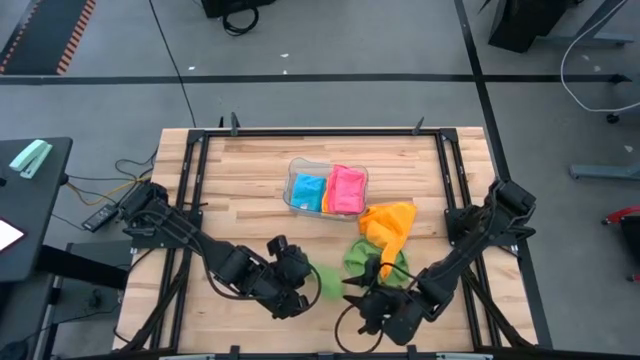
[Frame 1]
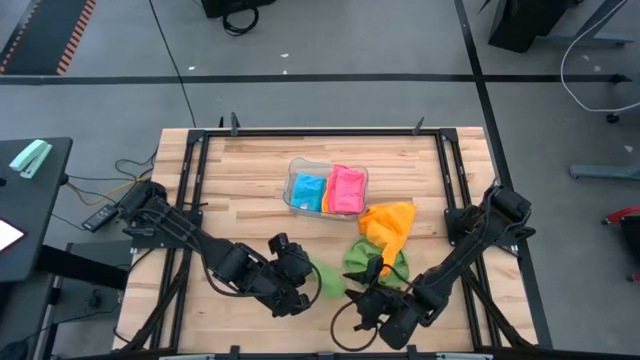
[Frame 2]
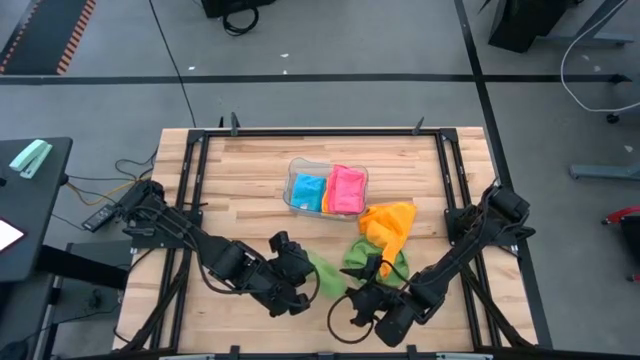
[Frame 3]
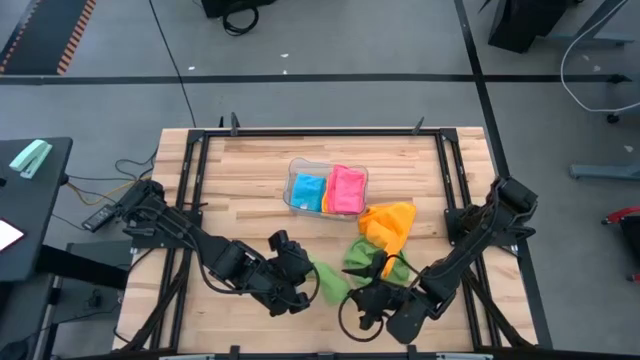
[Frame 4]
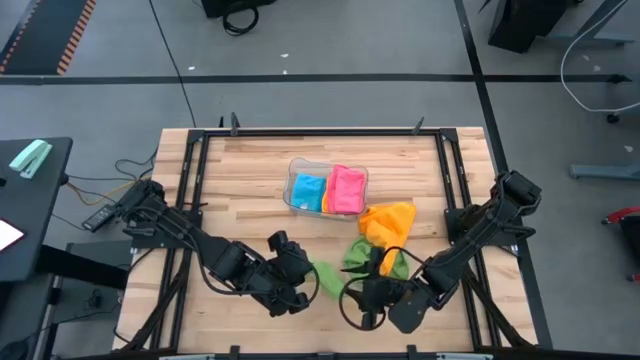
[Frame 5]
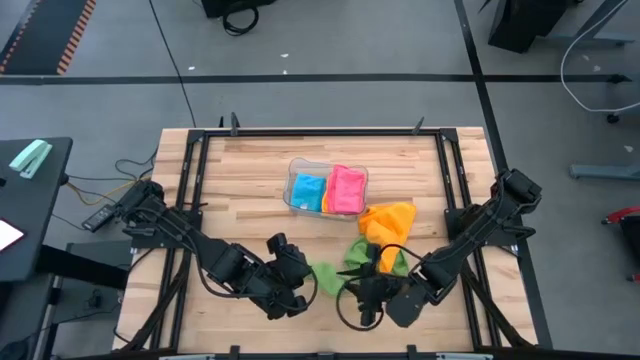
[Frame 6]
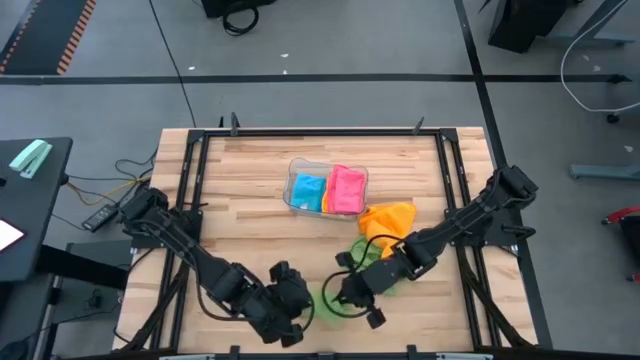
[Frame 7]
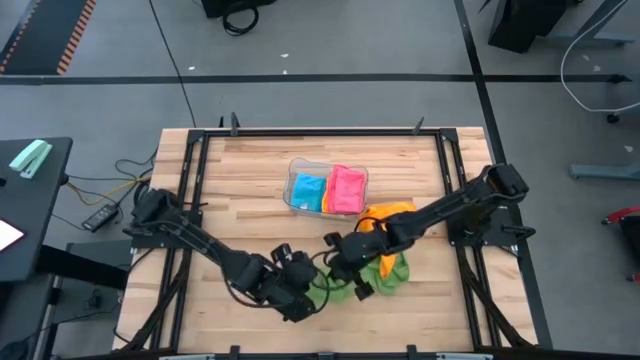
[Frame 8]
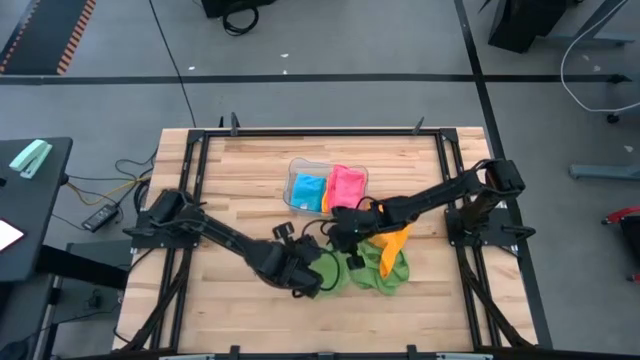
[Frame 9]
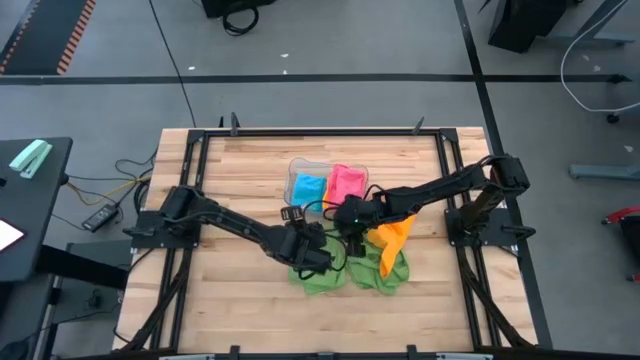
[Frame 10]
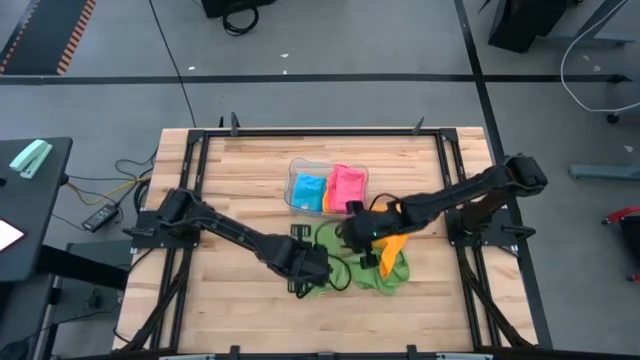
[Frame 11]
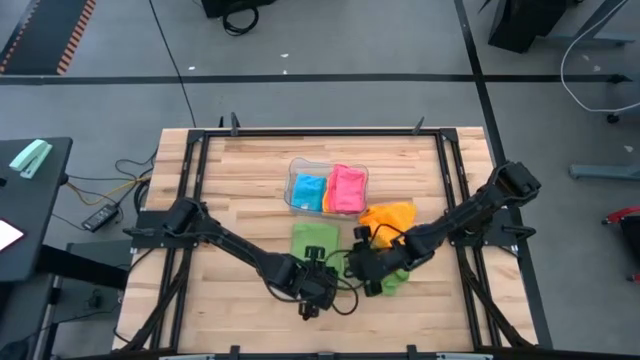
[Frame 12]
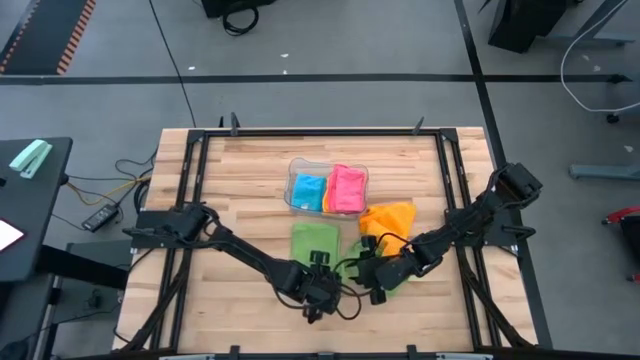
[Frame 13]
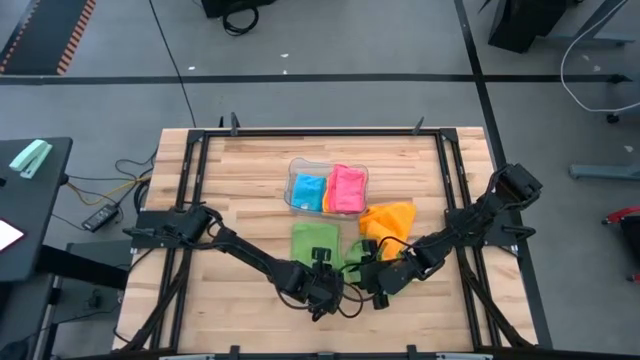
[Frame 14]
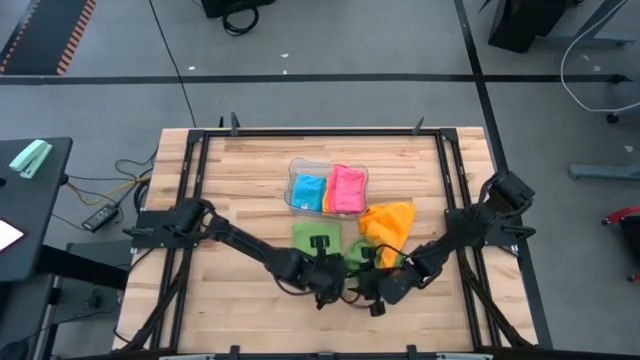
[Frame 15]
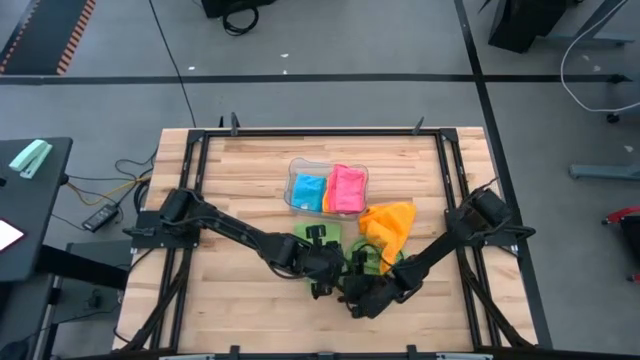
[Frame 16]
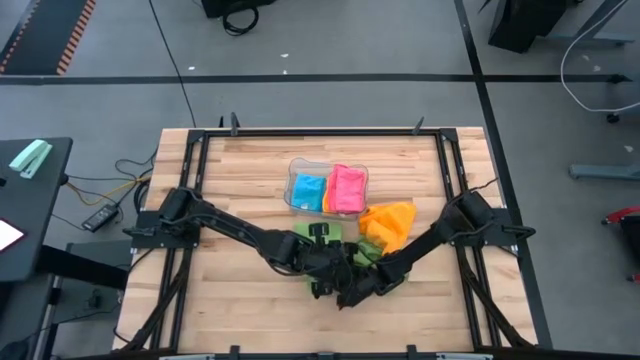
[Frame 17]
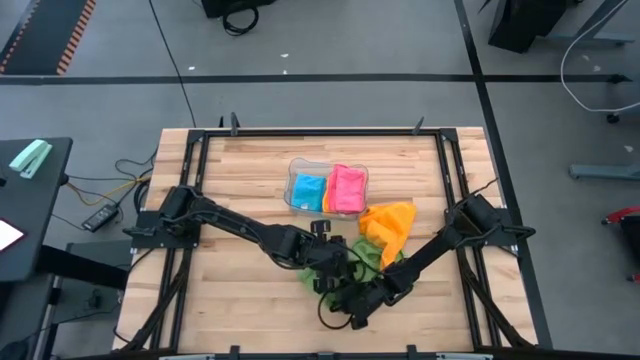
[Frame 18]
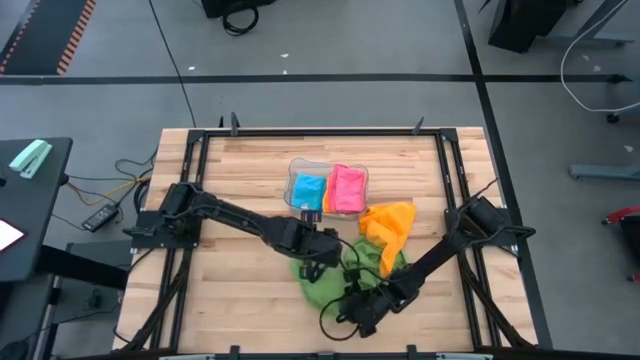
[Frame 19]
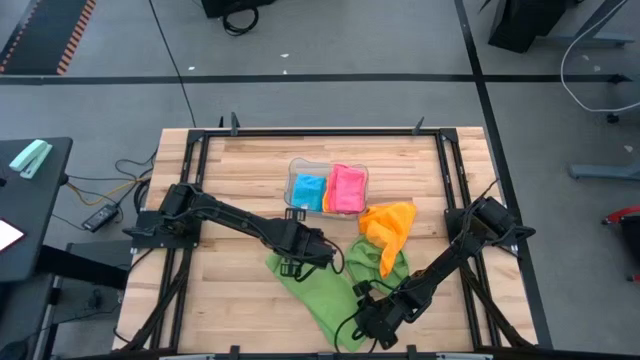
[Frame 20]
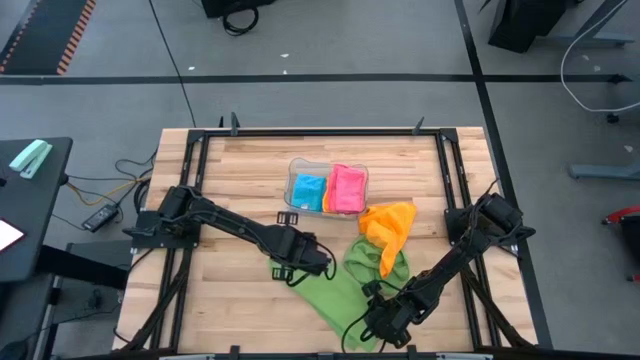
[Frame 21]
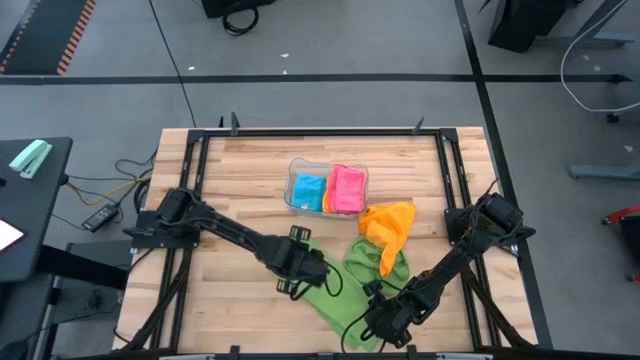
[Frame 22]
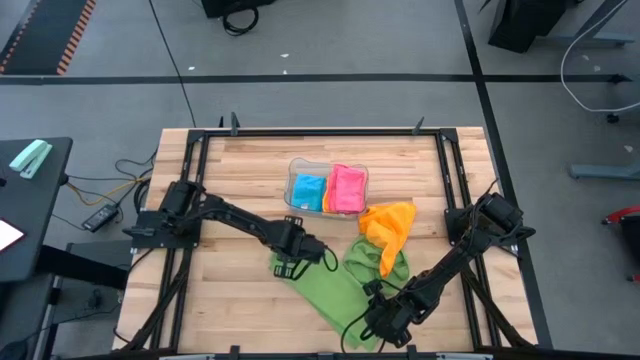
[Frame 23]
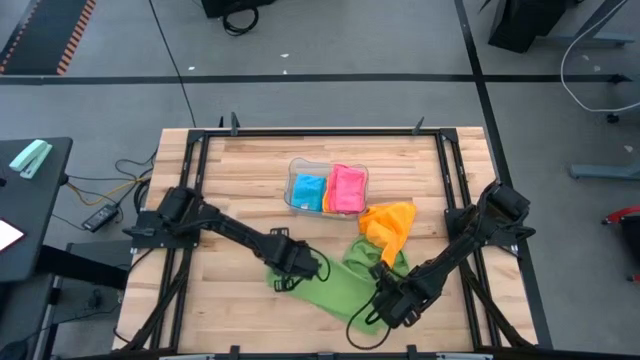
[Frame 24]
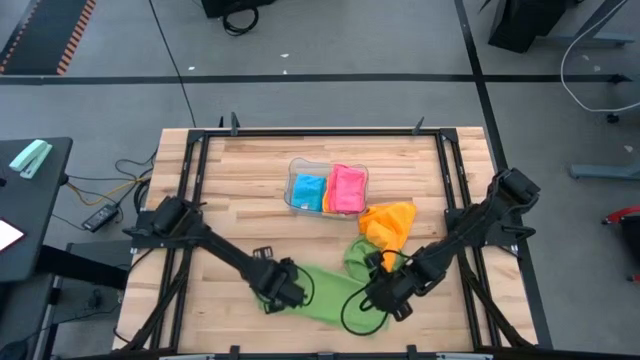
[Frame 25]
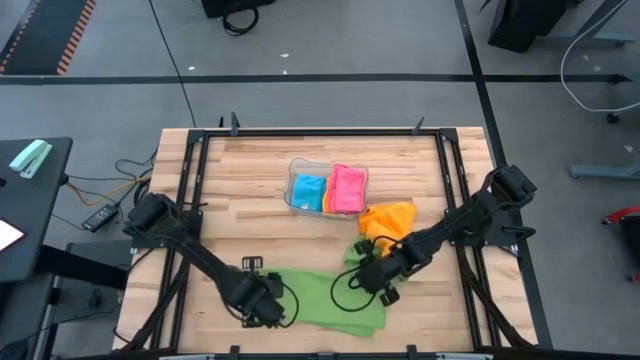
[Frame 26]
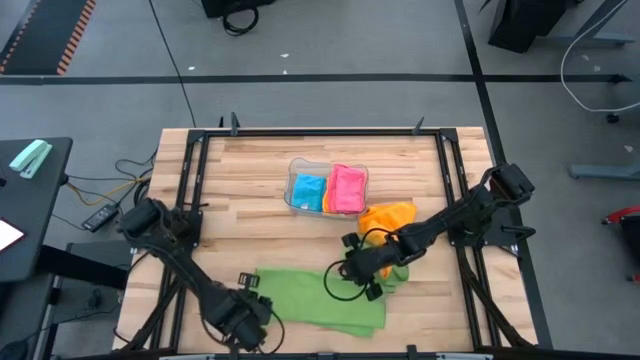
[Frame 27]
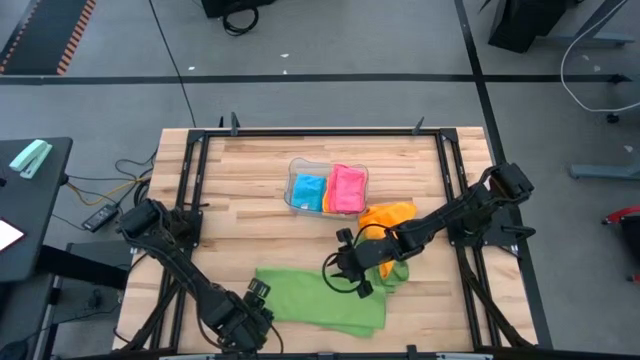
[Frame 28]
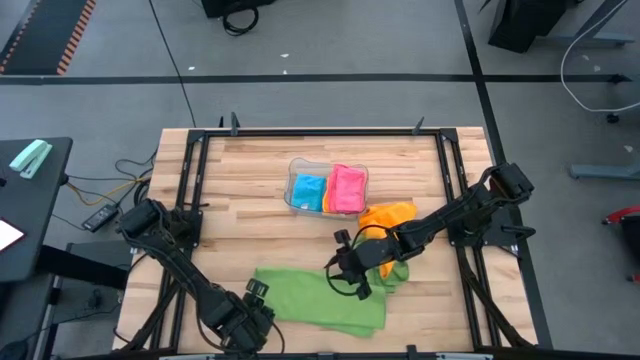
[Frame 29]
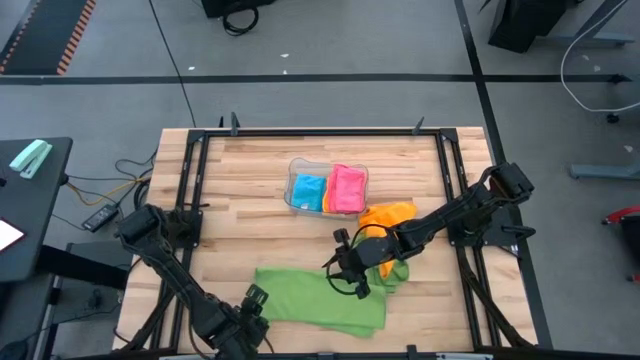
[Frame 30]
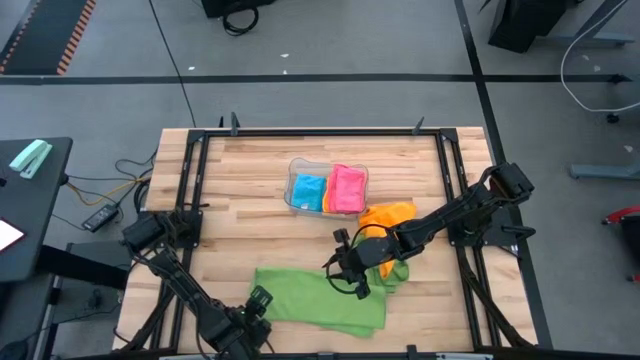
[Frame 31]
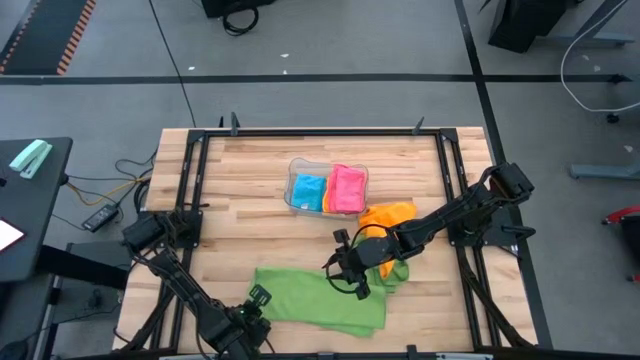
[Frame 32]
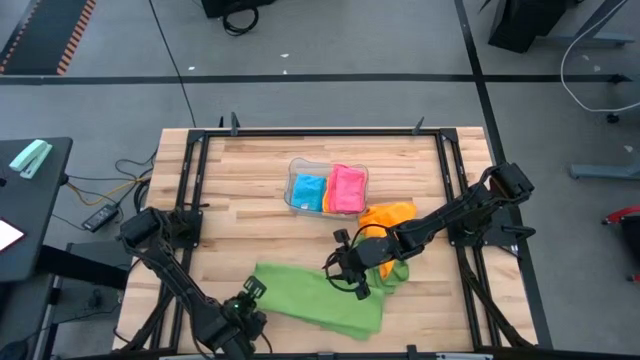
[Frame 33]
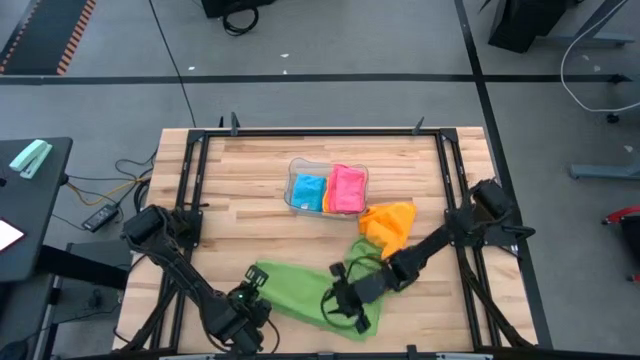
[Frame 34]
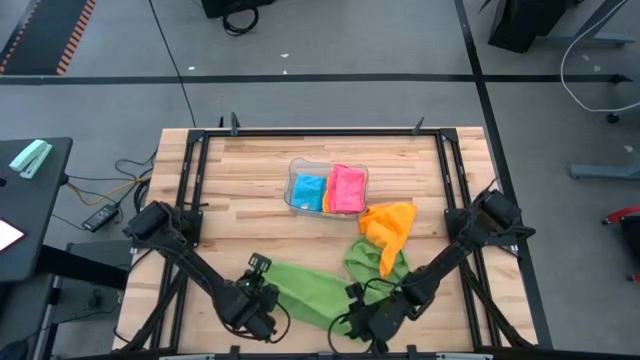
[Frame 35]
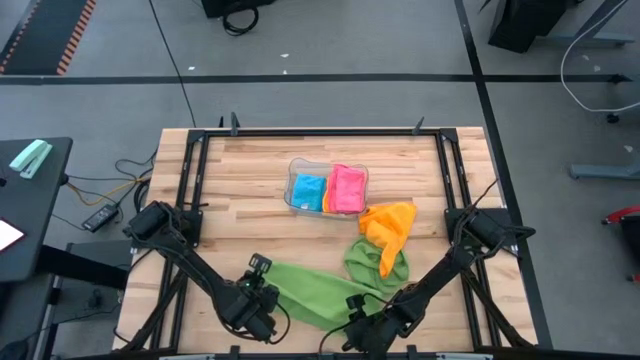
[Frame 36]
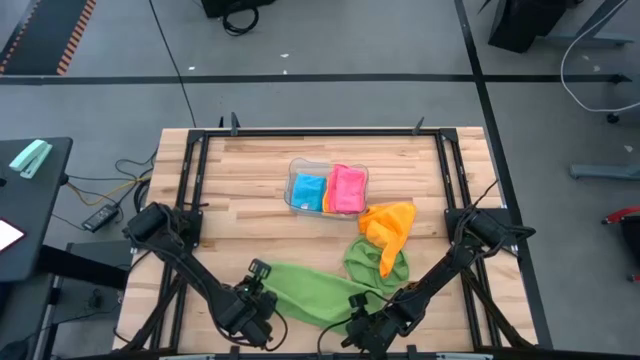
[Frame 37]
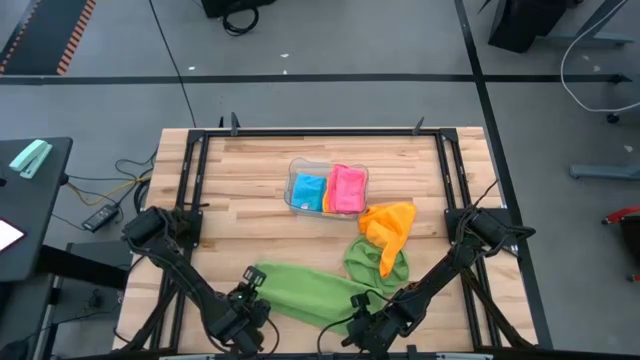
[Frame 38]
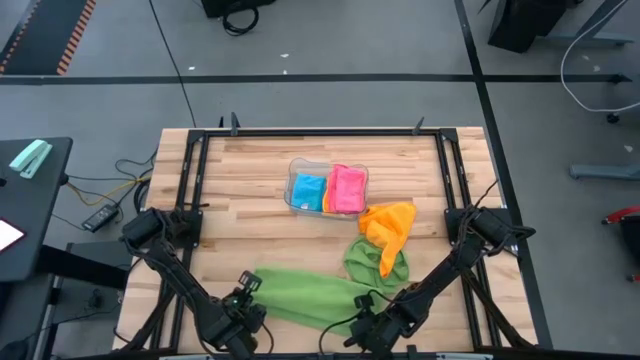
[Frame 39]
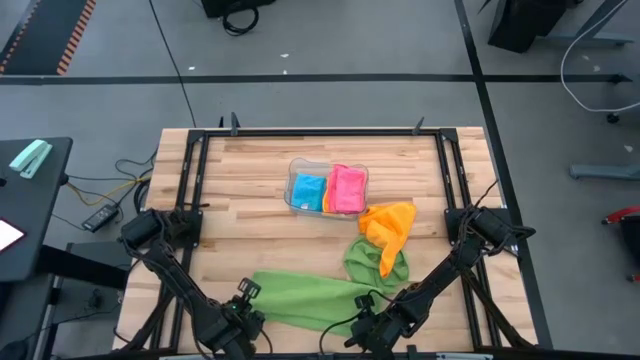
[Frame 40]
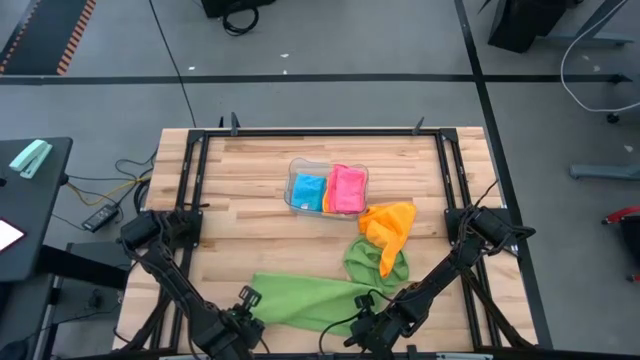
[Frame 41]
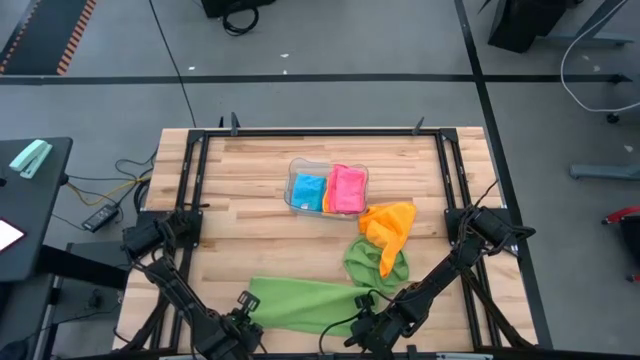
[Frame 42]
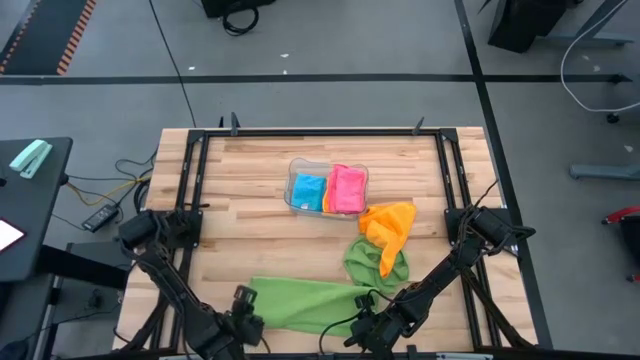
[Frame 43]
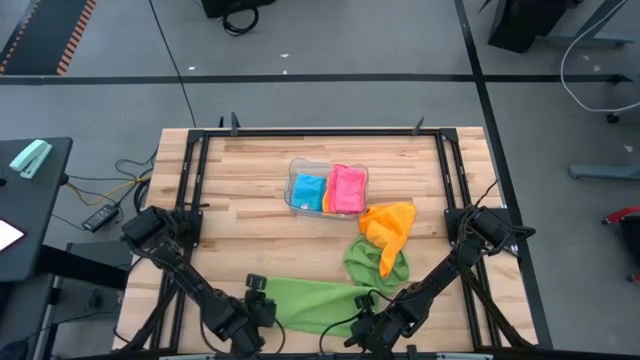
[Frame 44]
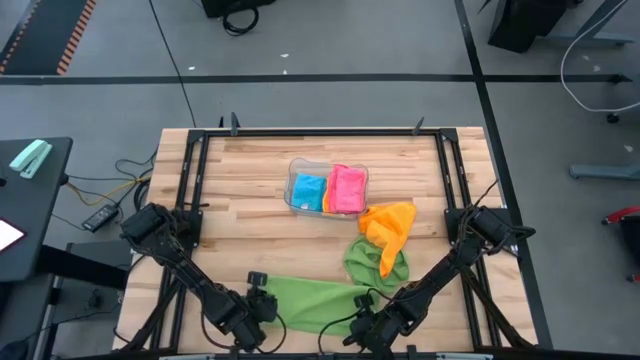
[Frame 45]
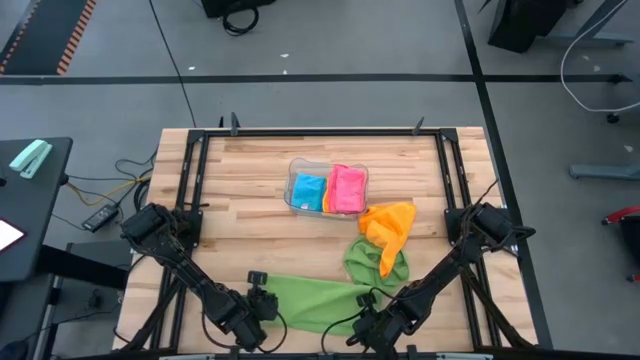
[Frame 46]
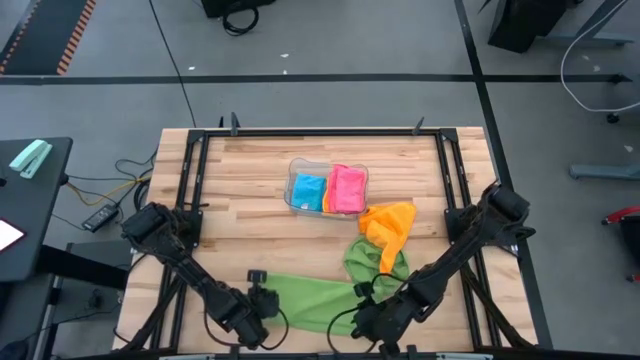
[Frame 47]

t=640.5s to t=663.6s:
Task: Fold microfiber towels
Fold the top green microfiber cloth
